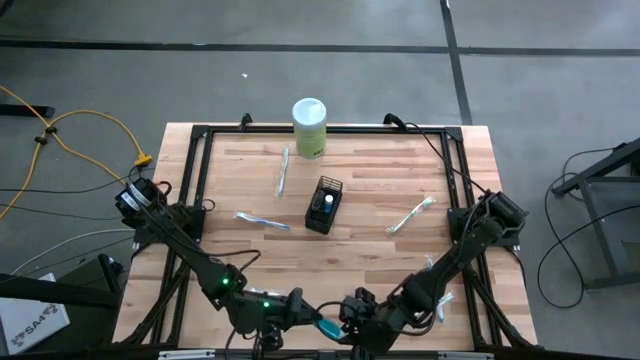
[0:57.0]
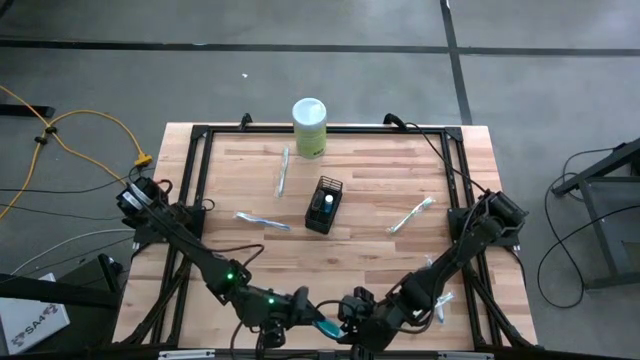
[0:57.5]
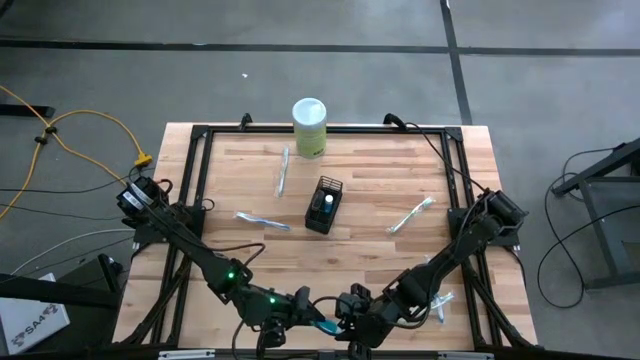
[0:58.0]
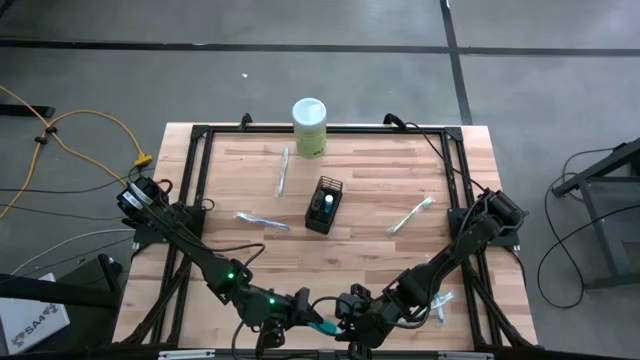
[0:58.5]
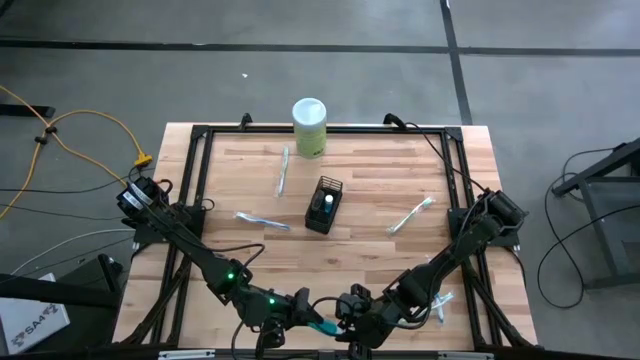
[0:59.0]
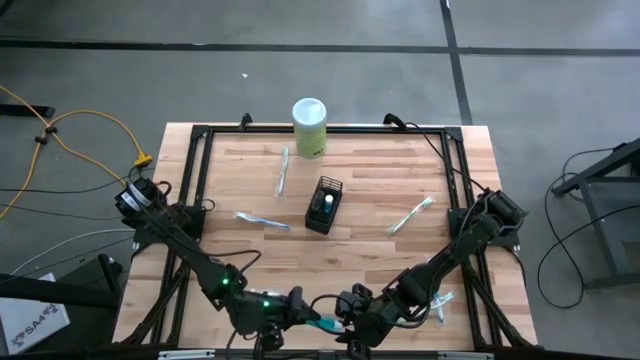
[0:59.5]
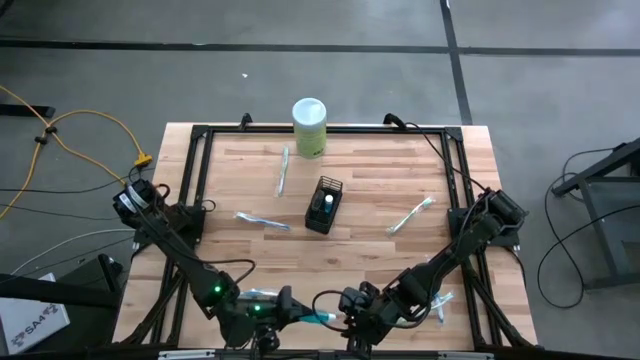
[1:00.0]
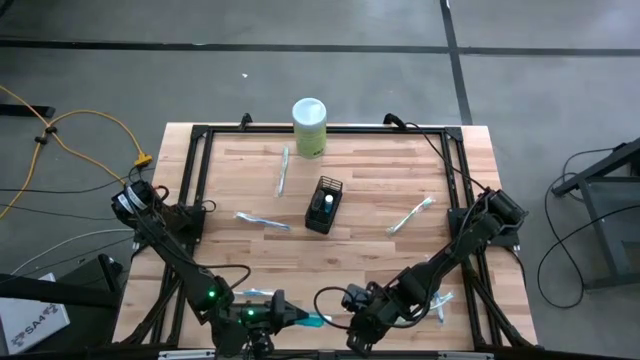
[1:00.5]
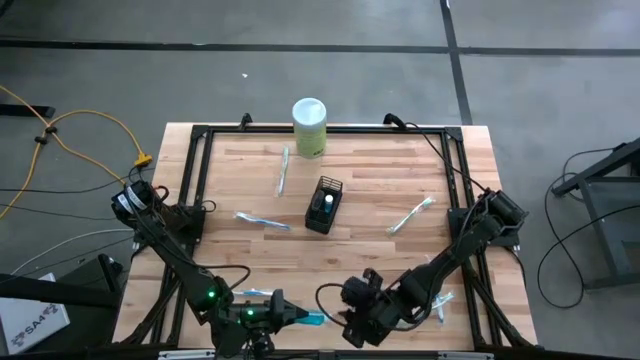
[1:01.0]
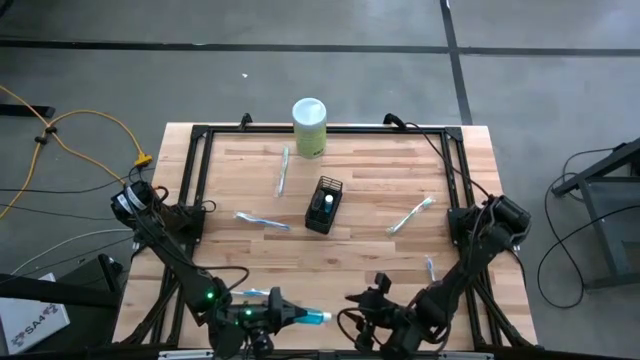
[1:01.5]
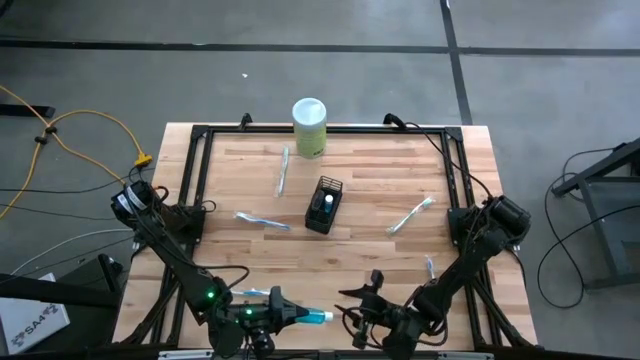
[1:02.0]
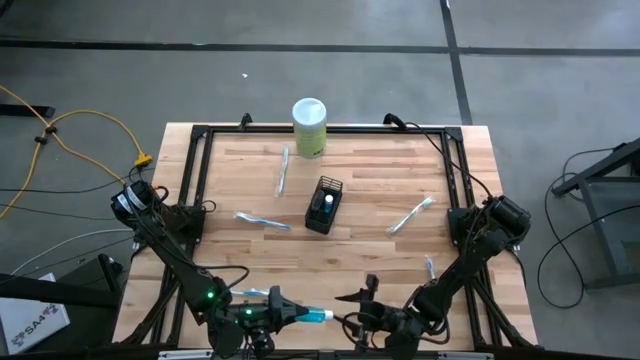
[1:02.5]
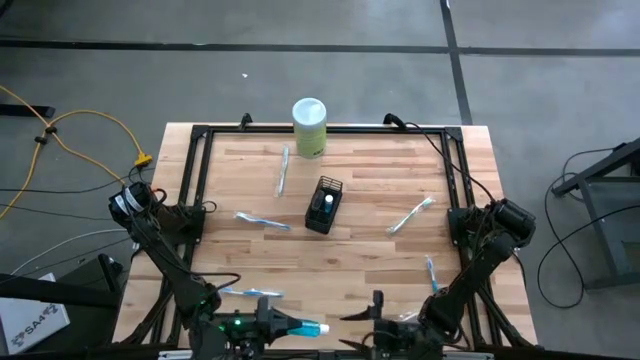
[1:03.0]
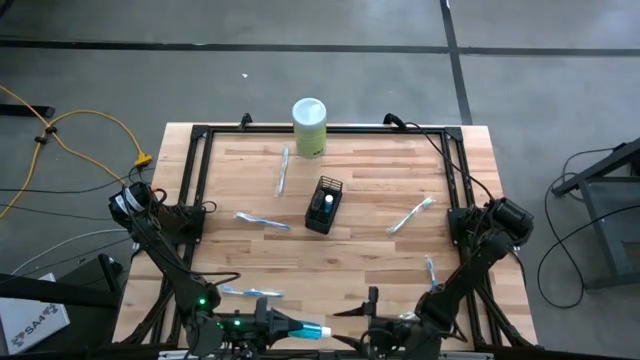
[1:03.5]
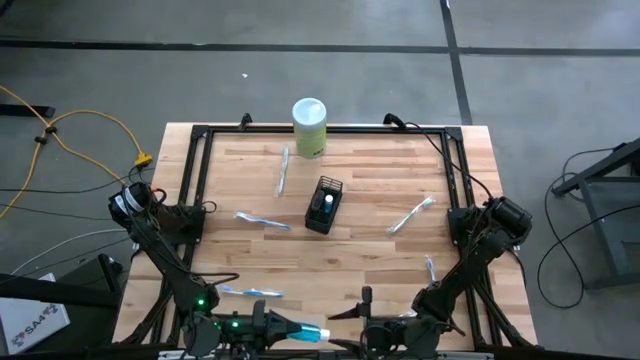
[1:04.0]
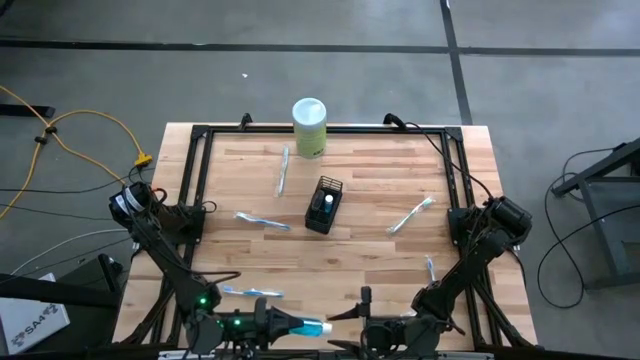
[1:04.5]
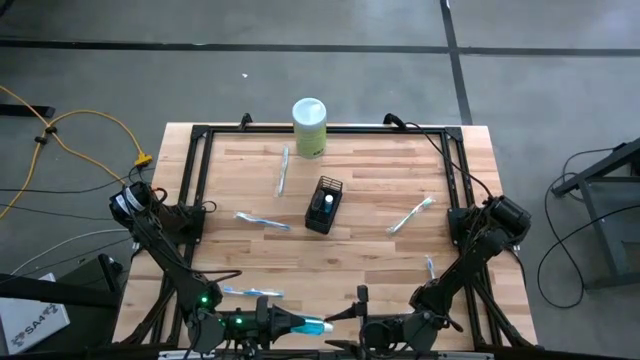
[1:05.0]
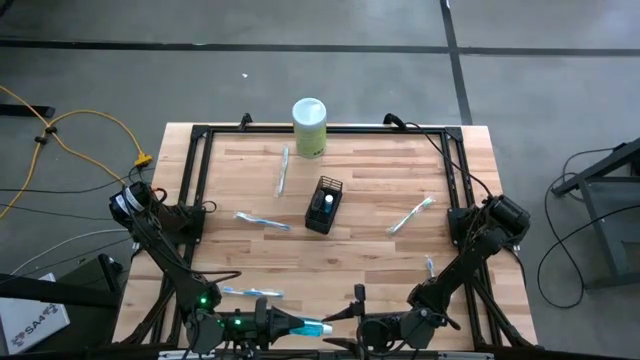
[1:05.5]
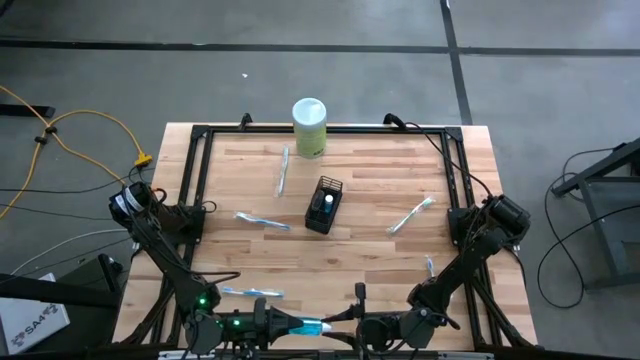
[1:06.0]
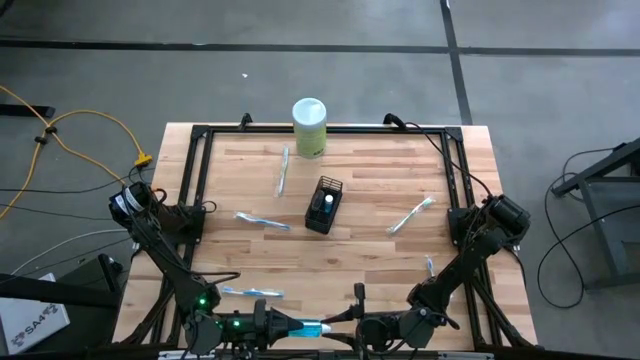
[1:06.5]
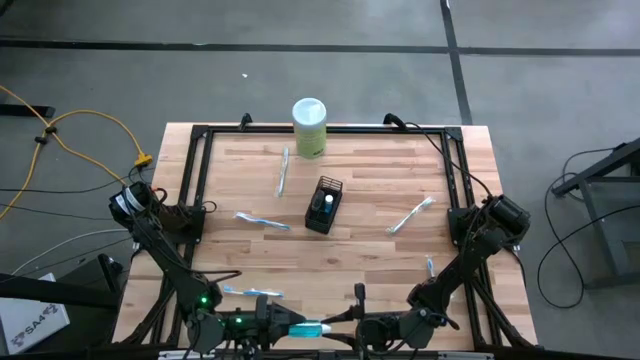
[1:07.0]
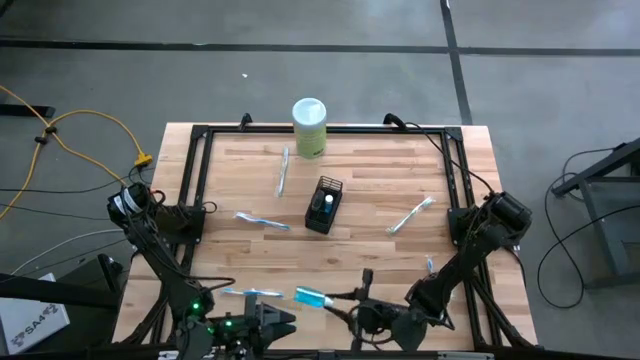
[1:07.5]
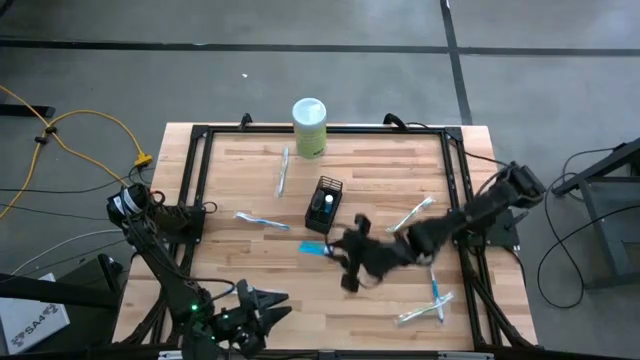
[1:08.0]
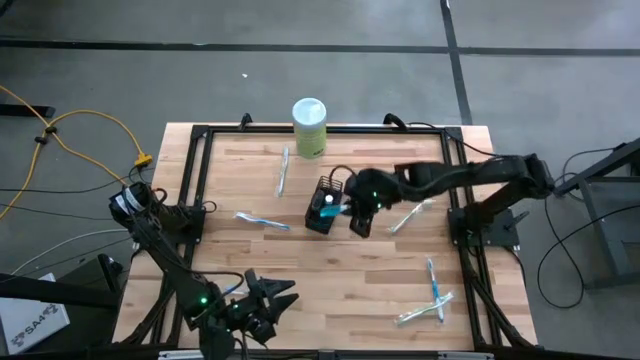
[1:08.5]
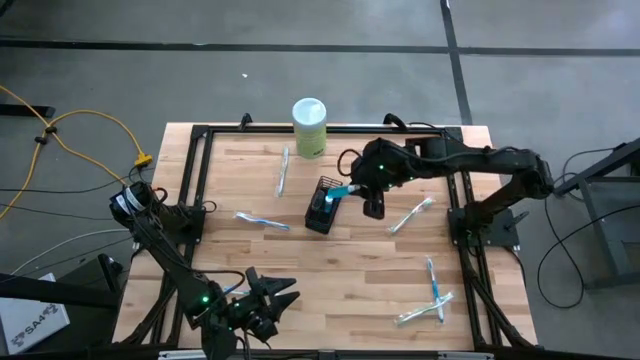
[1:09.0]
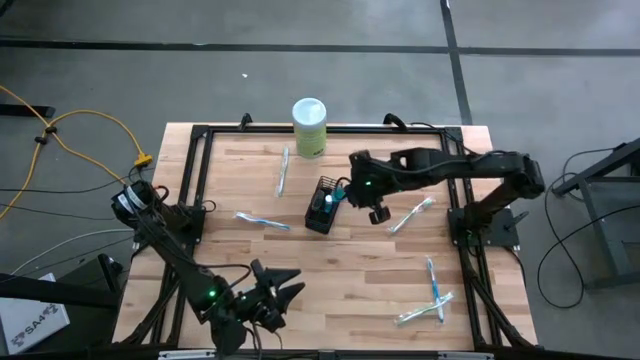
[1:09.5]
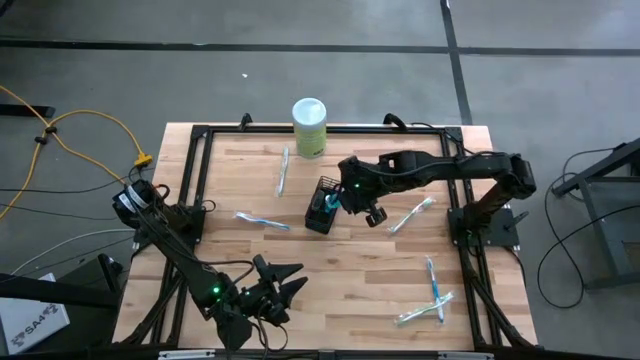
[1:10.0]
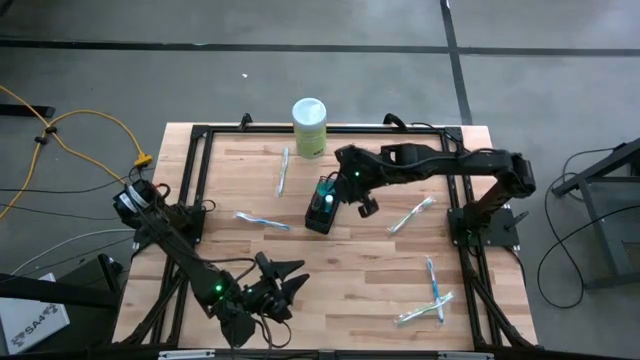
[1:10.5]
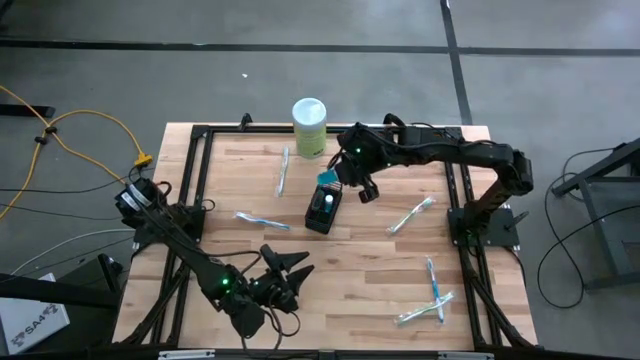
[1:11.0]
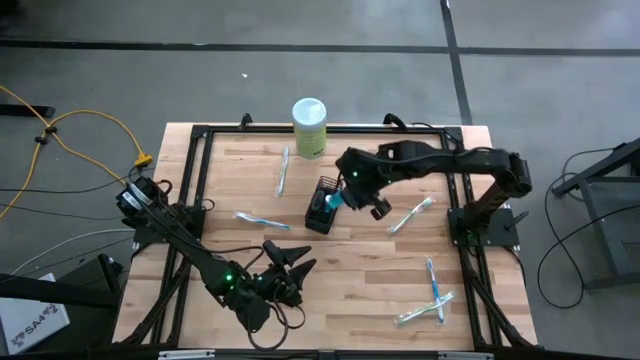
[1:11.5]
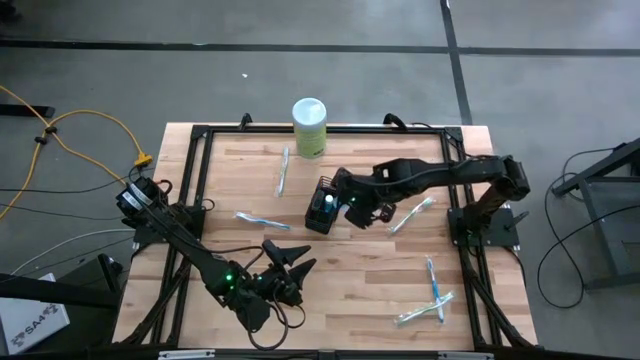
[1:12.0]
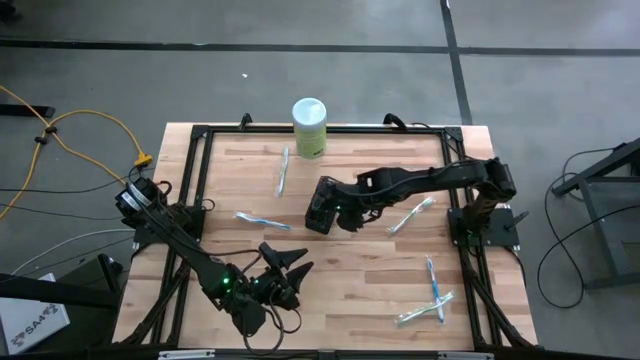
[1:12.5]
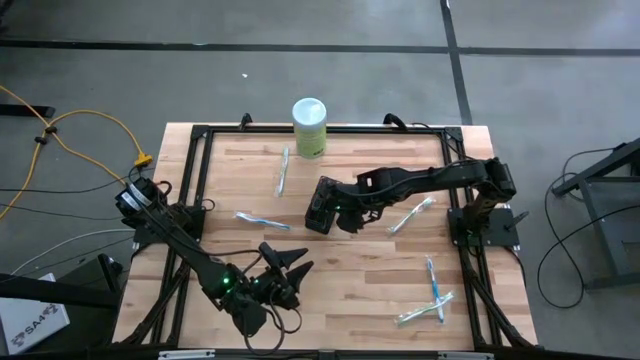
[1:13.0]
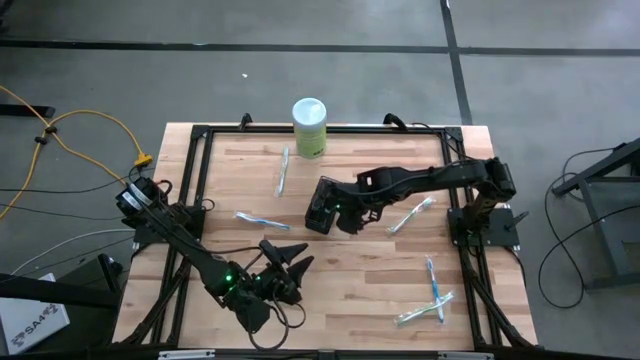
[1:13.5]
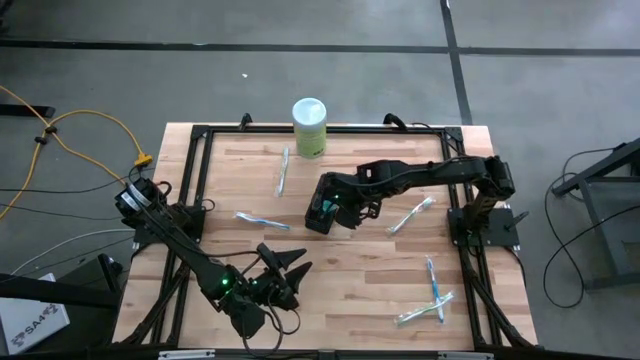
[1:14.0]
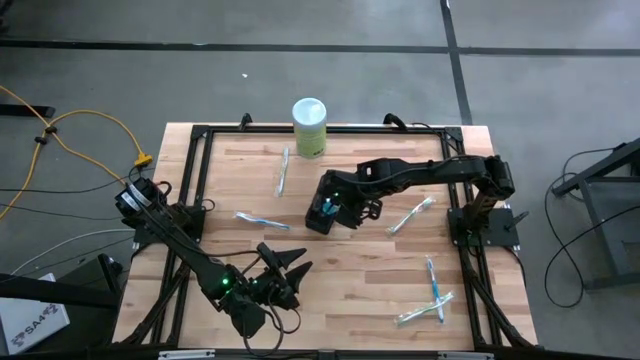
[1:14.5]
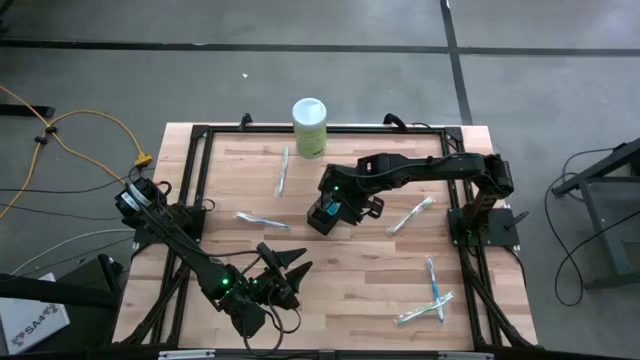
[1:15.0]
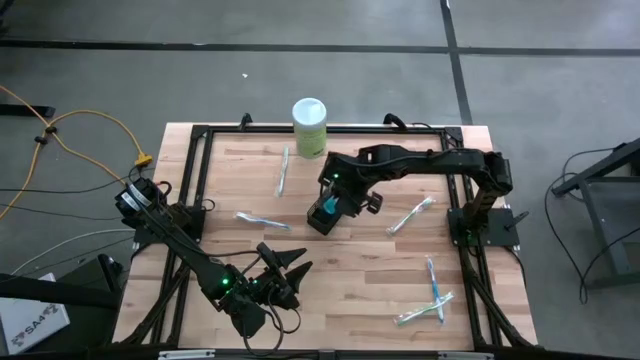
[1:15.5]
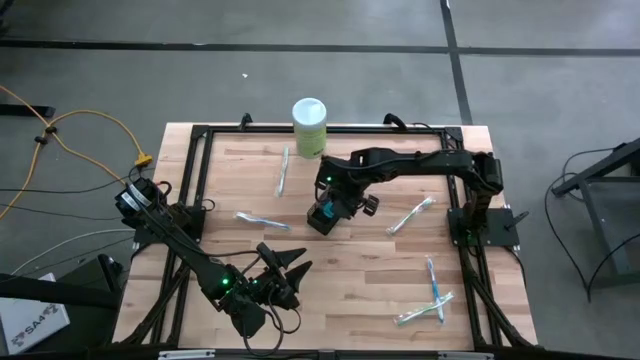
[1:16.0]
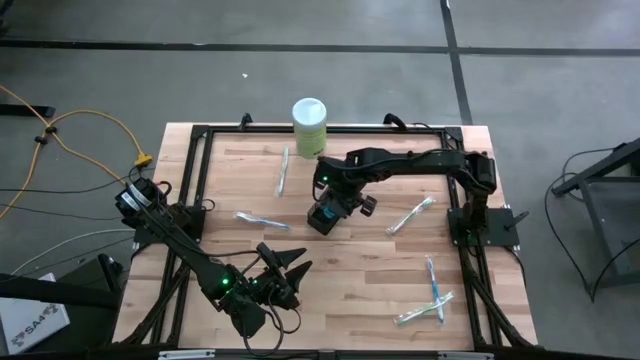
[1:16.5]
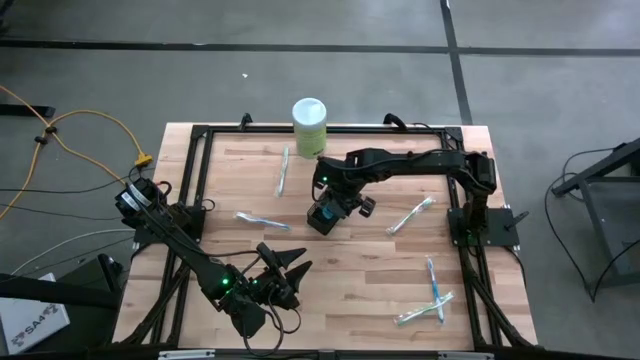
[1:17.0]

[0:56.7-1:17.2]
Task: Pick & Place toothbrushing station
Put the blue mouthwash into the middle section of the black wire organizer
